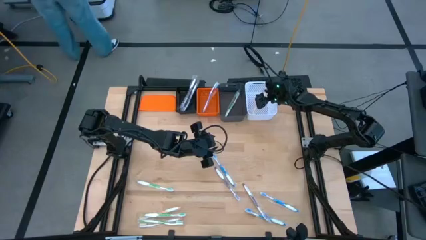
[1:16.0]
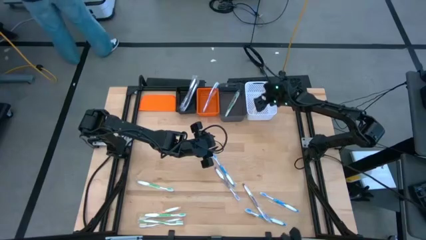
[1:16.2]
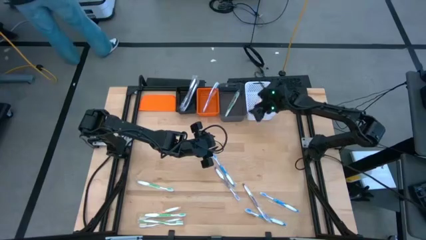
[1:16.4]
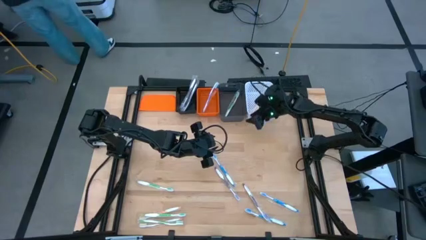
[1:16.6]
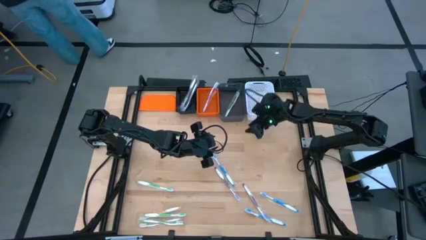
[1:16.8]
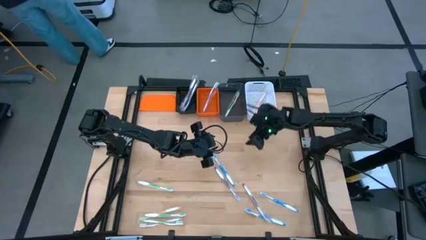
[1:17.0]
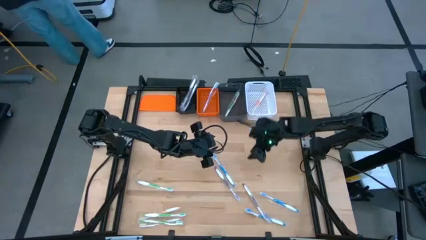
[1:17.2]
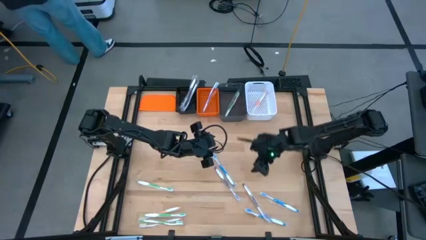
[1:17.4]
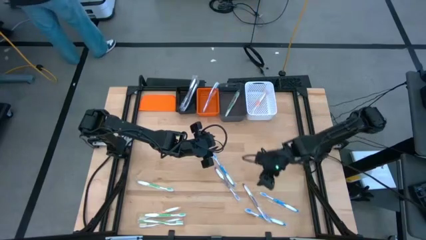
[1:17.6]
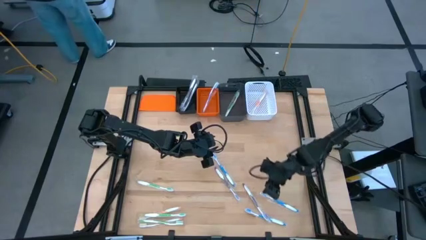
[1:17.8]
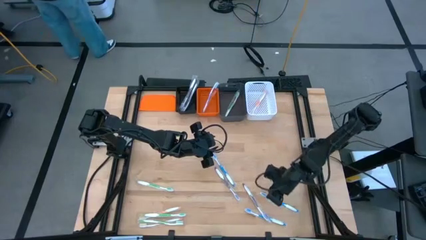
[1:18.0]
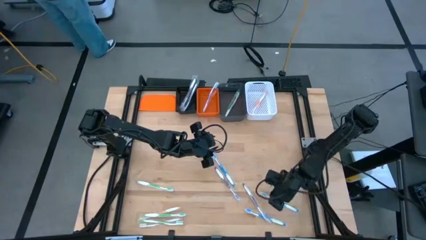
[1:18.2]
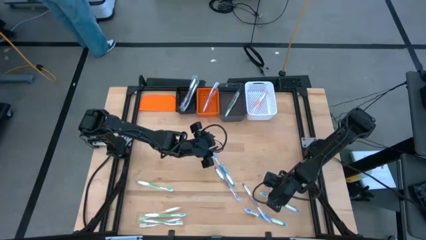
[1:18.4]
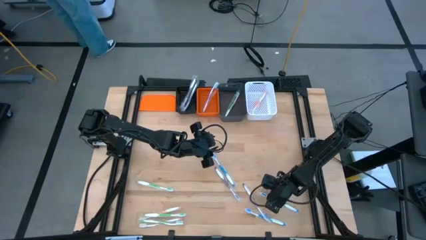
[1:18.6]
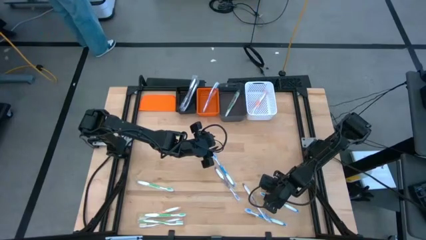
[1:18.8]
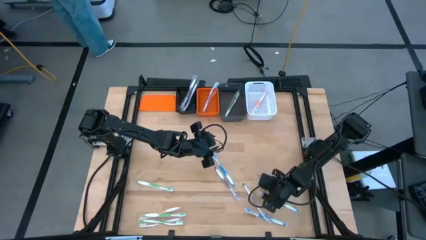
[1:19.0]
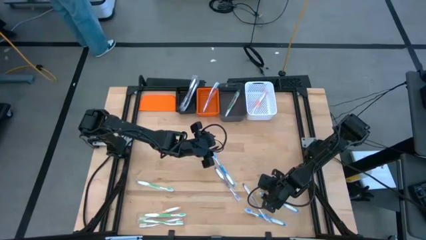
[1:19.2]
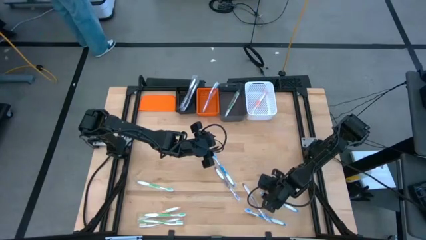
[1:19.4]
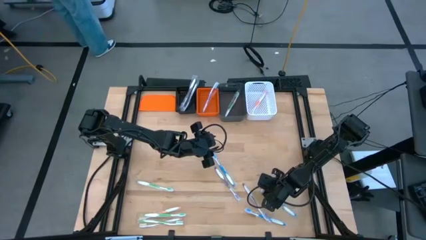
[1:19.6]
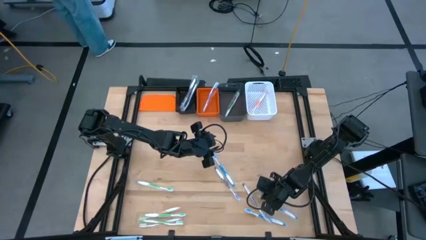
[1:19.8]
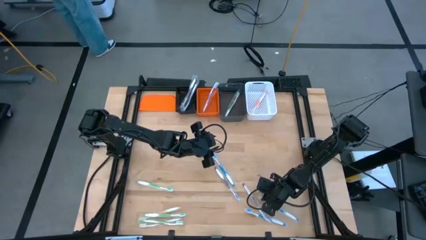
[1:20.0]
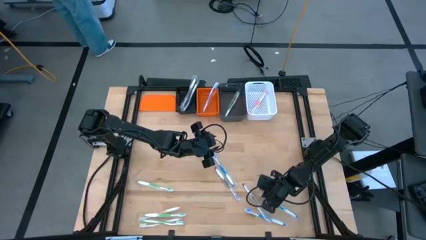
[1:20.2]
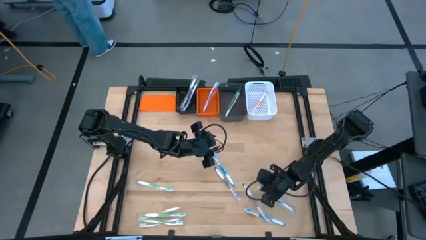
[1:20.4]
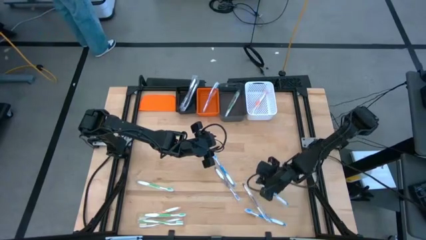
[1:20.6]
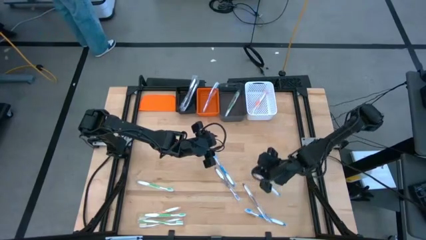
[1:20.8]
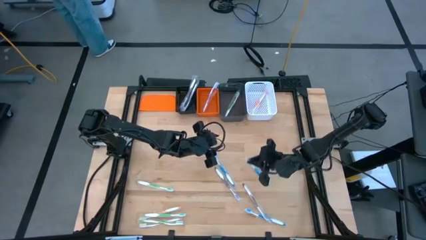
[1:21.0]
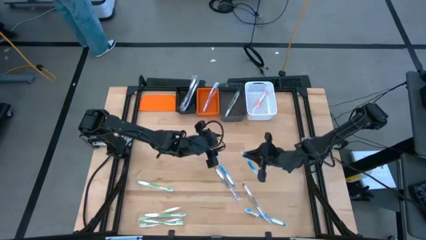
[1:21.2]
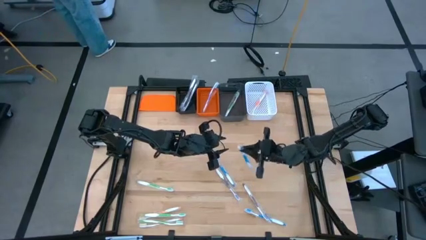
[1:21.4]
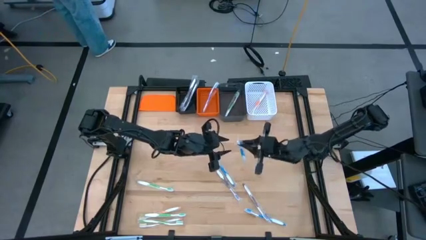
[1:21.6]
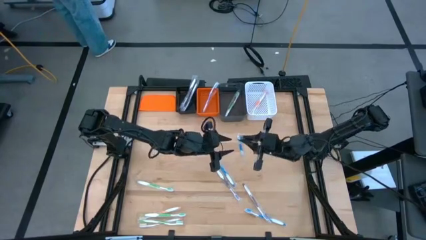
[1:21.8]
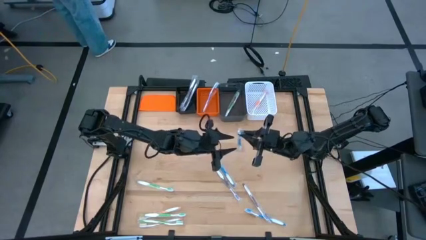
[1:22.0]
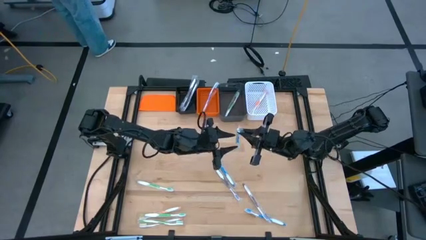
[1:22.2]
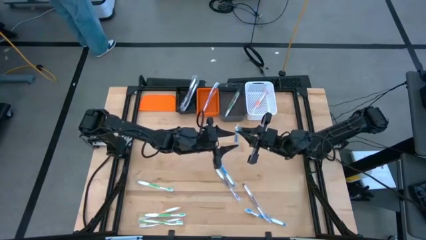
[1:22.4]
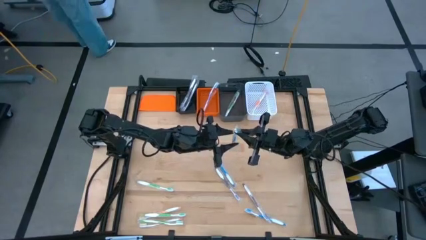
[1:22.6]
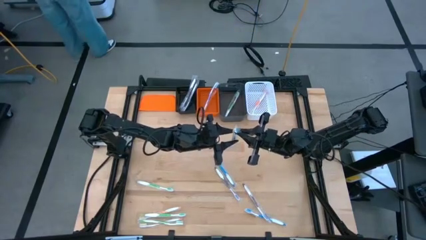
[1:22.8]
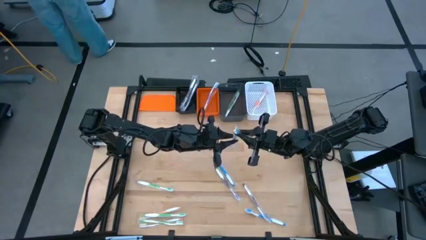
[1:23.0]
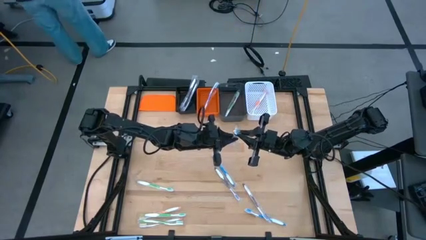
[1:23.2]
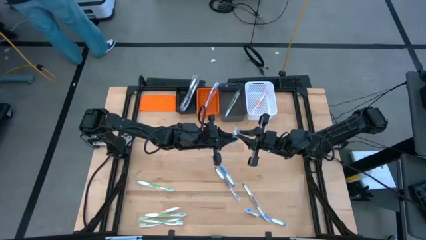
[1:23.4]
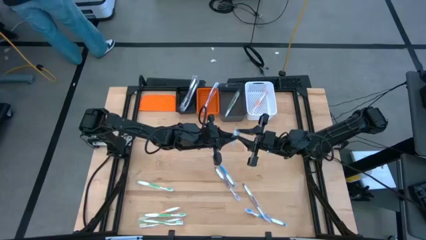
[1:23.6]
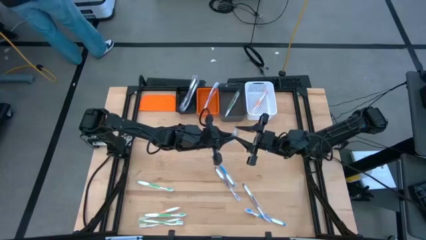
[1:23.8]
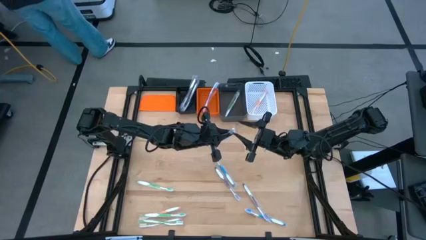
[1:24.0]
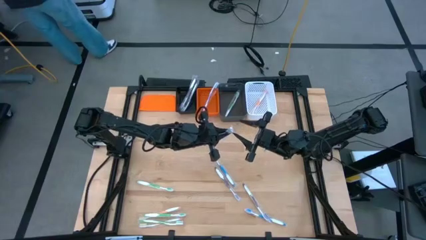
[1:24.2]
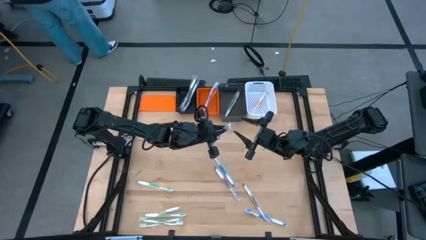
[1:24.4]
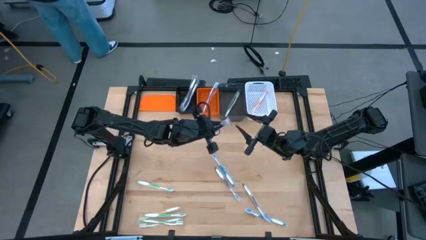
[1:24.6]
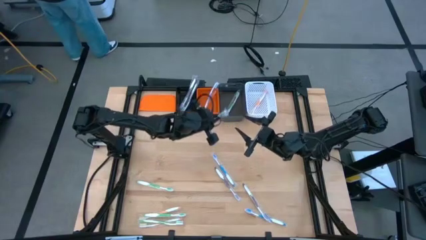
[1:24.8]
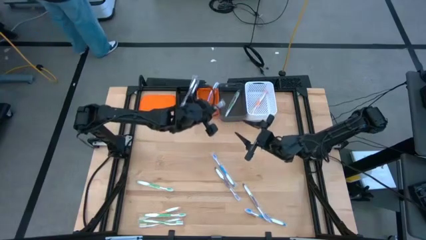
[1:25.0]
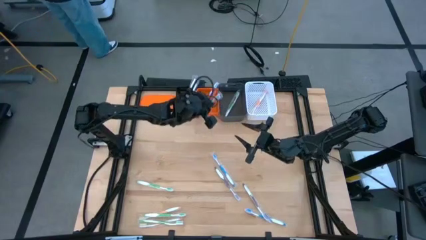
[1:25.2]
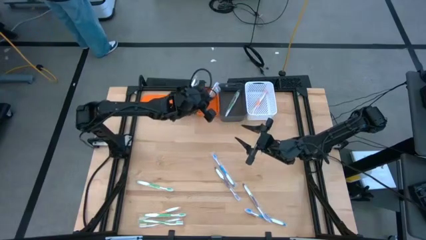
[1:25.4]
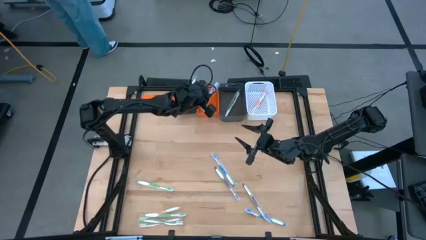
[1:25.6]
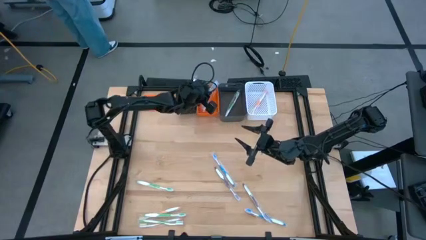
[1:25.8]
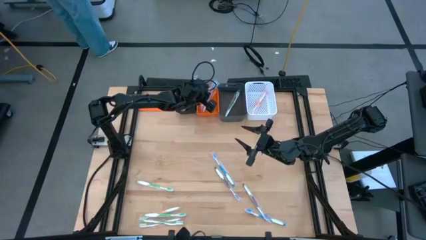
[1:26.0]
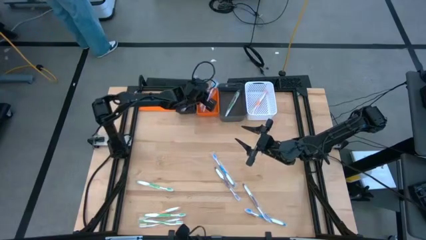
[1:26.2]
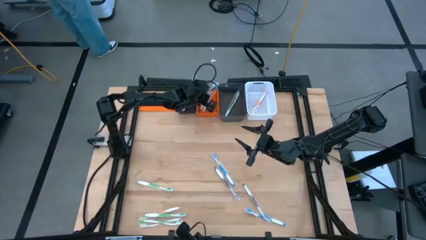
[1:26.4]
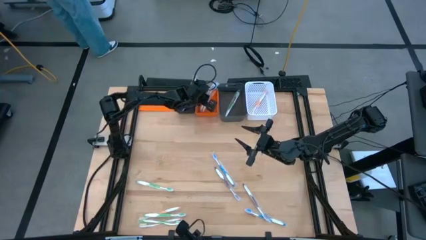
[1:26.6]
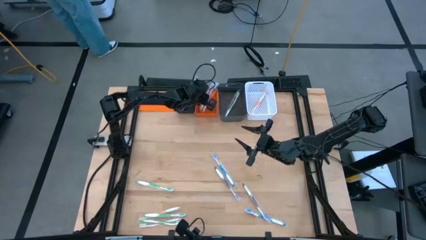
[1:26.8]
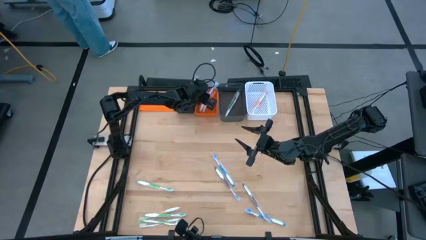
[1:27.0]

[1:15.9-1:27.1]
Task: Pick & Place Toothbrushes
Put the blue toothbrush into the orange bin

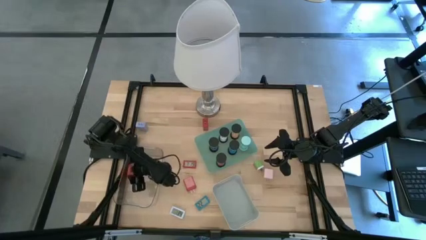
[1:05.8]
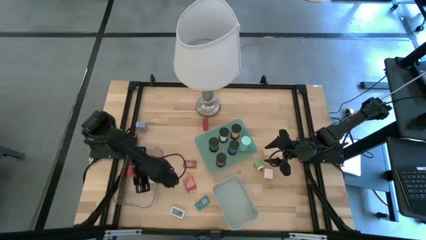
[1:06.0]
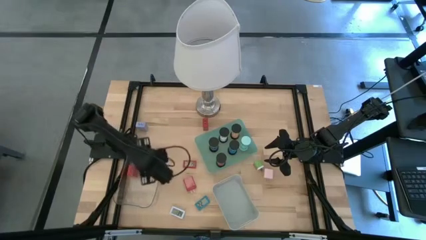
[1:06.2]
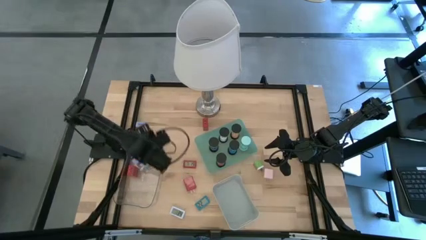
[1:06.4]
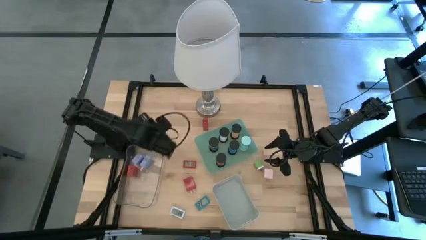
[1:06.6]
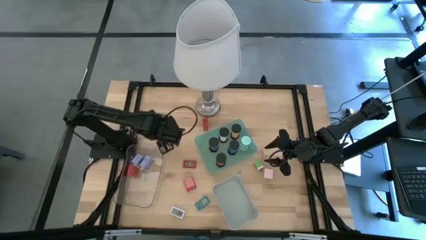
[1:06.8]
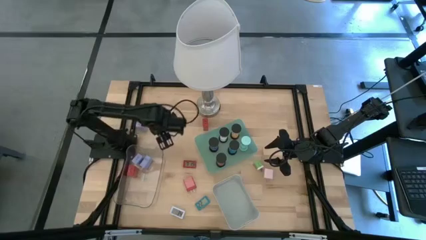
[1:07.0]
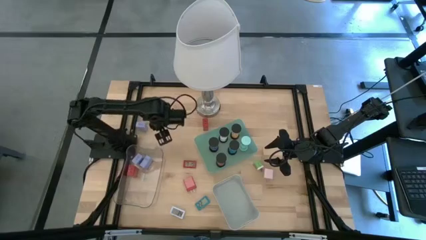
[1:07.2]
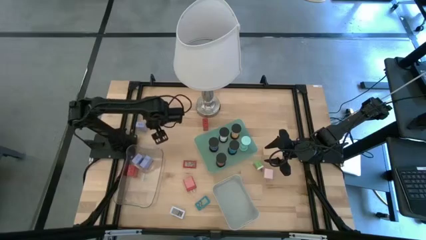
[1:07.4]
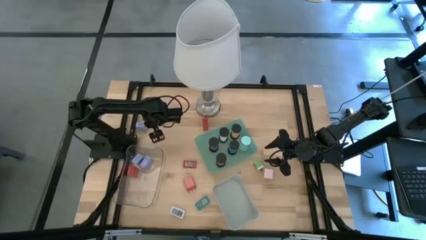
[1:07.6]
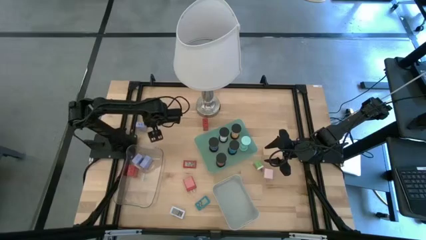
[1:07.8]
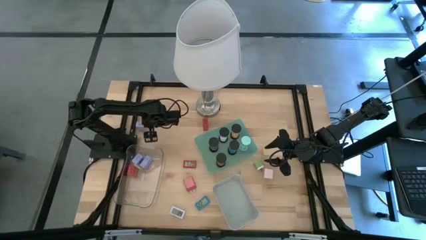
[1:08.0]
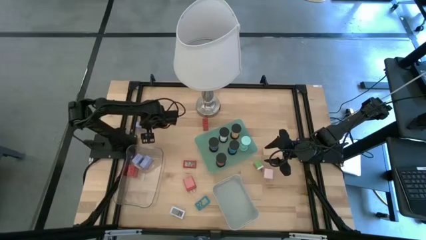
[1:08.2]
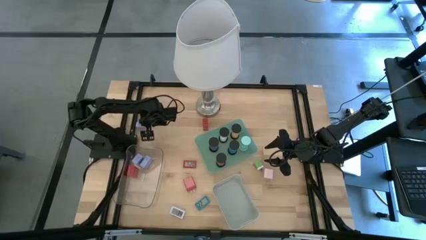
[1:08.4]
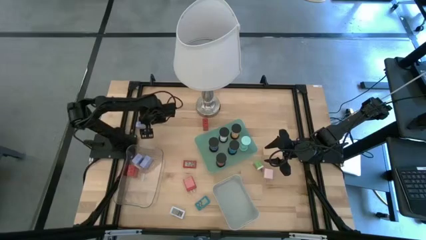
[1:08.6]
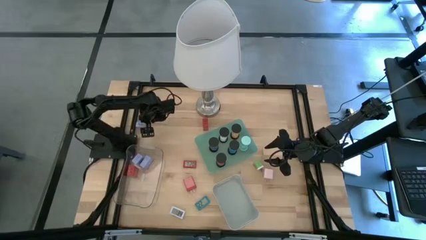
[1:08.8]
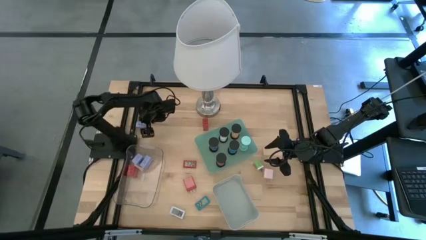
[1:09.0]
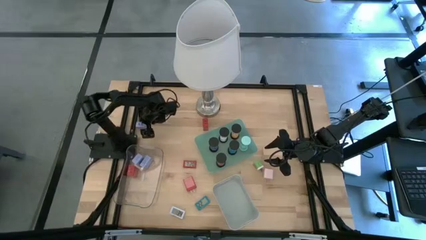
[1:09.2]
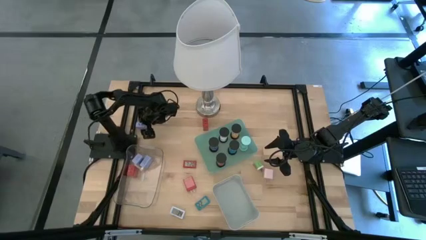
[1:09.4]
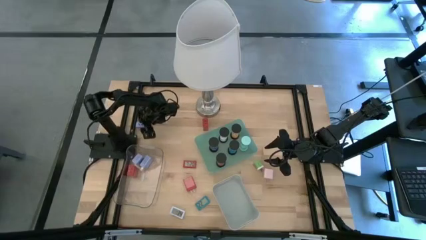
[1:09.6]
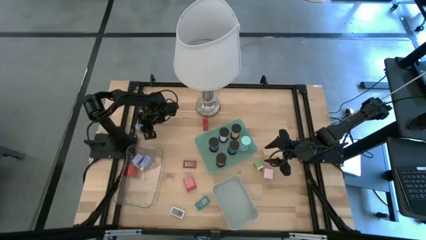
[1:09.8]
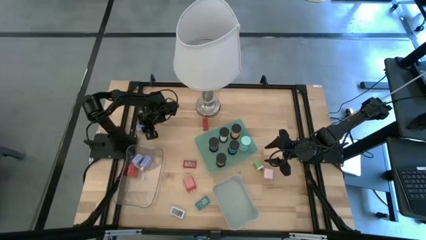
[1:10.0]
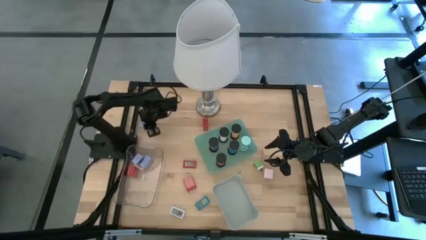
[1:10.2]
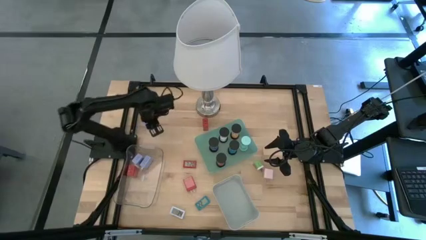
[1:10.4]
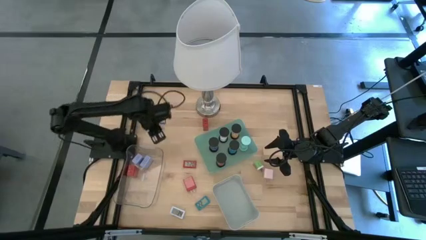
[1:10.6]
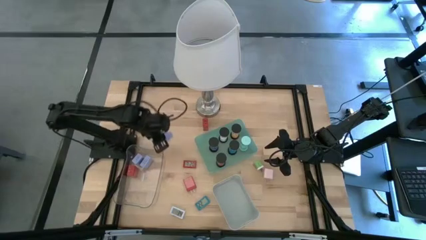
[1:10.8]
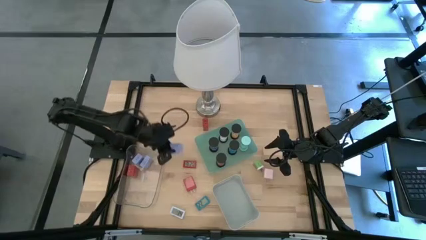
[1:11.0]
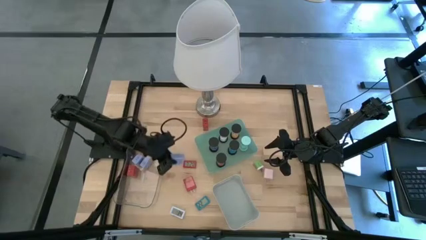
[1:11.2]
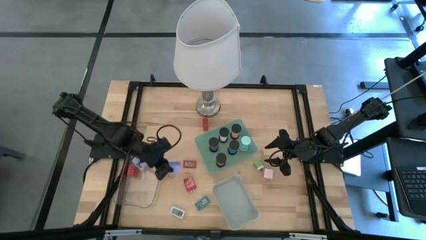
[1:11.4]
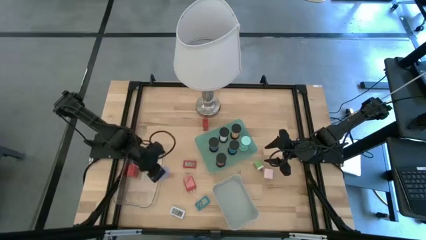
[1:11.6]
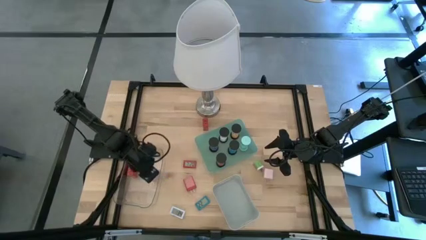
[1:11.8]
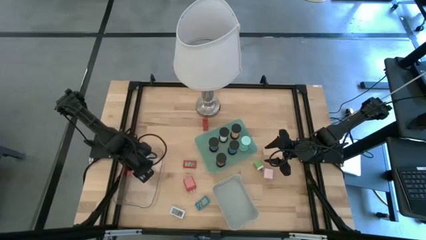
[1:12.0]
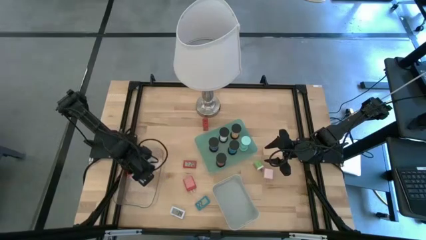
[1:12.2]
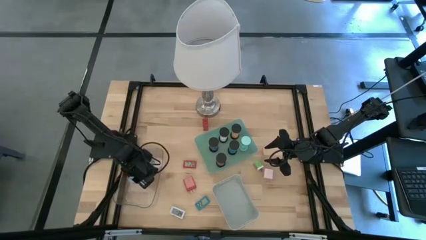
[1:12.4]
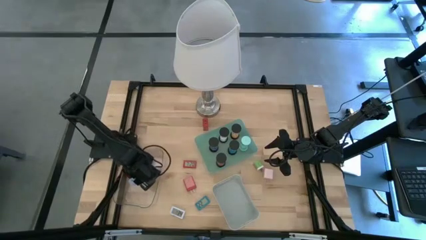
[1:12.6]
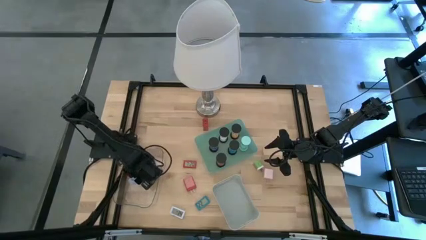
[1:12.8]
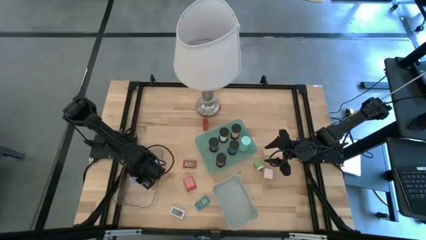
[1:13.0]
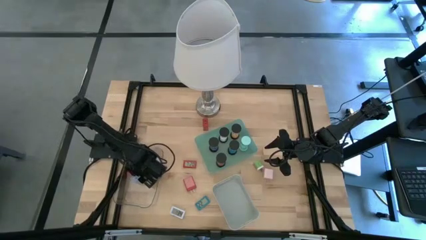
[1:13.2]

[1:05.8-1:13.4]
Task: Pick & Place Office items
Put the blue charger adapter into the transparent bin
